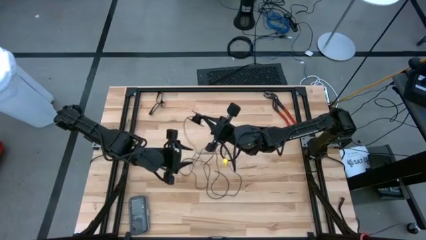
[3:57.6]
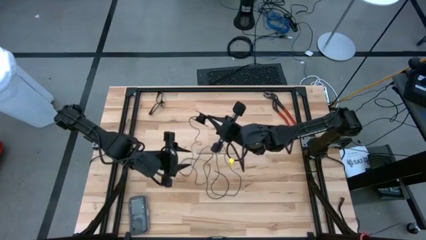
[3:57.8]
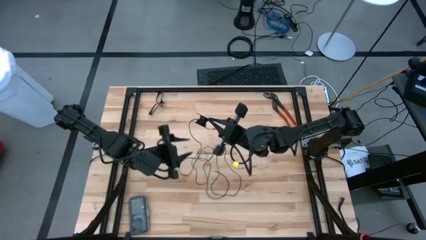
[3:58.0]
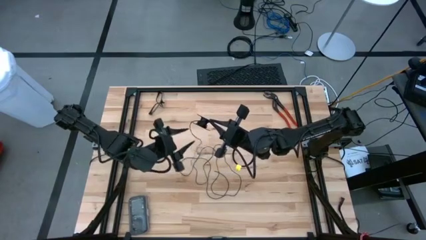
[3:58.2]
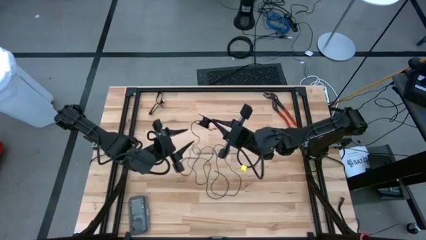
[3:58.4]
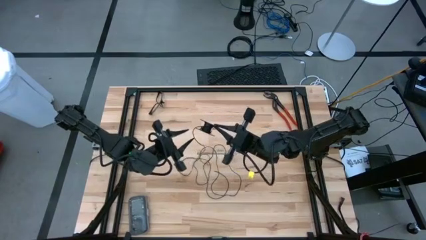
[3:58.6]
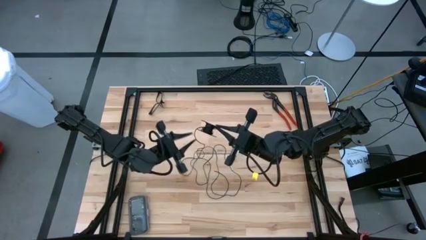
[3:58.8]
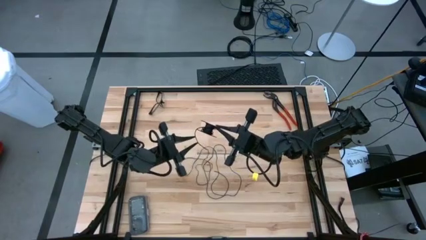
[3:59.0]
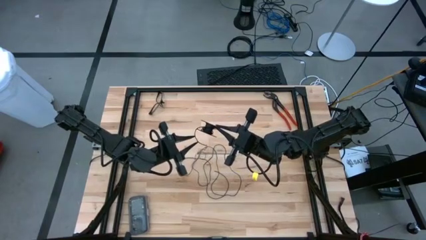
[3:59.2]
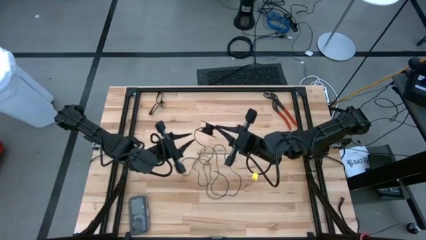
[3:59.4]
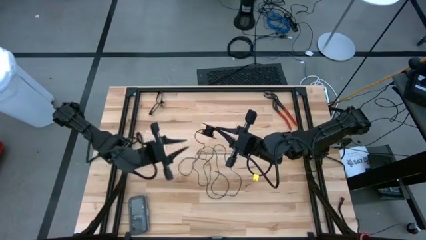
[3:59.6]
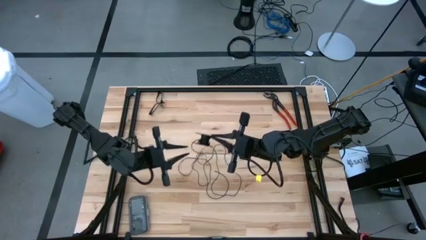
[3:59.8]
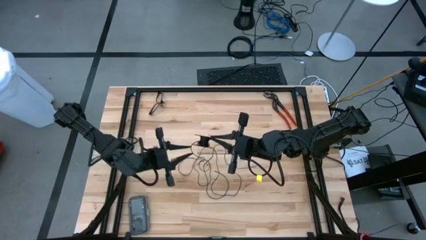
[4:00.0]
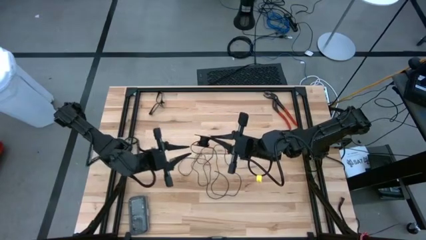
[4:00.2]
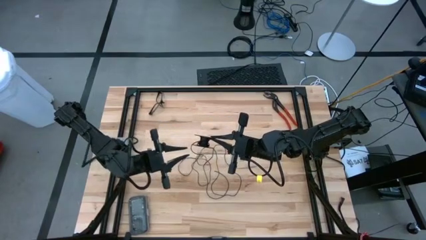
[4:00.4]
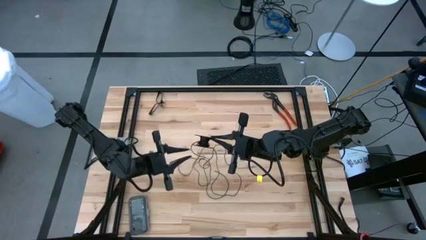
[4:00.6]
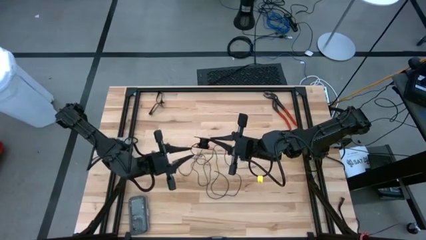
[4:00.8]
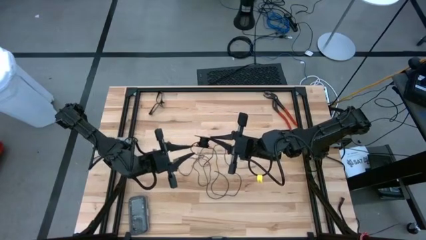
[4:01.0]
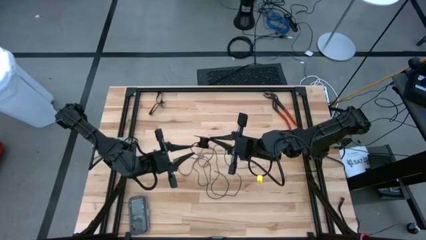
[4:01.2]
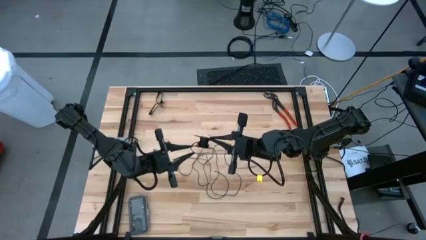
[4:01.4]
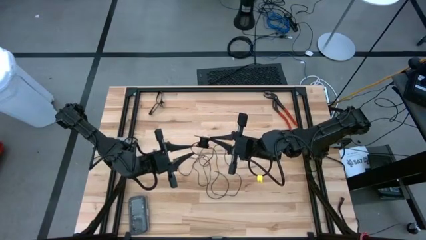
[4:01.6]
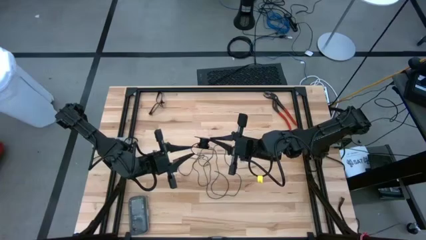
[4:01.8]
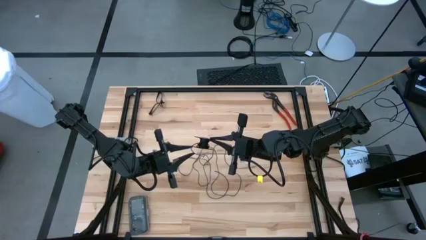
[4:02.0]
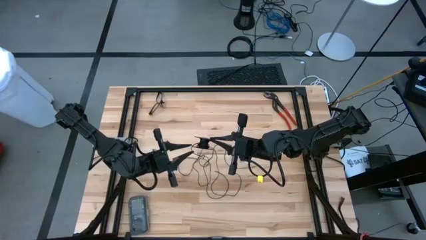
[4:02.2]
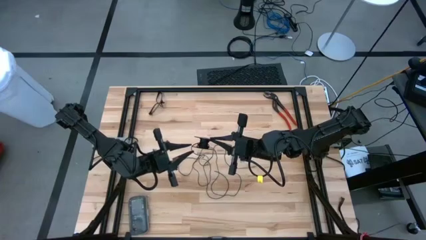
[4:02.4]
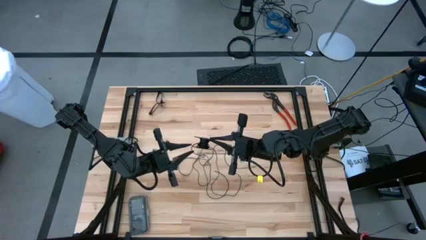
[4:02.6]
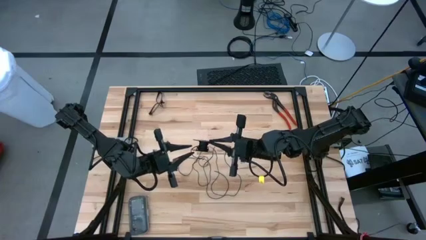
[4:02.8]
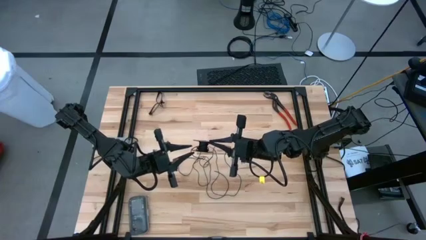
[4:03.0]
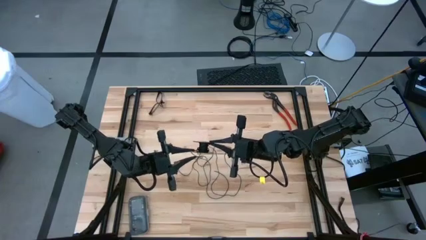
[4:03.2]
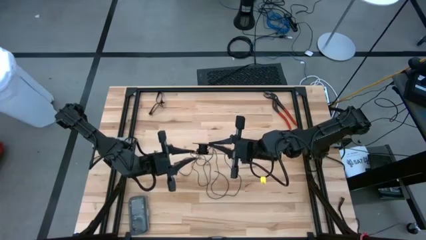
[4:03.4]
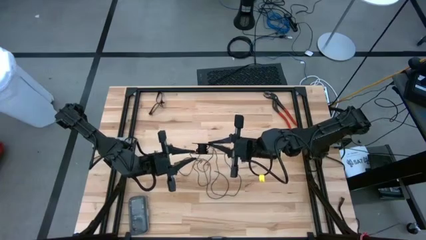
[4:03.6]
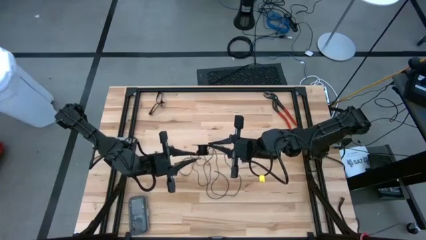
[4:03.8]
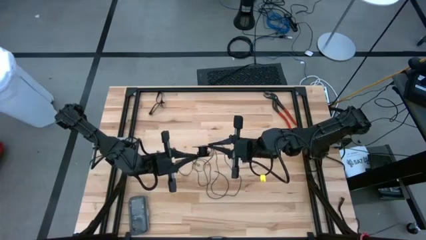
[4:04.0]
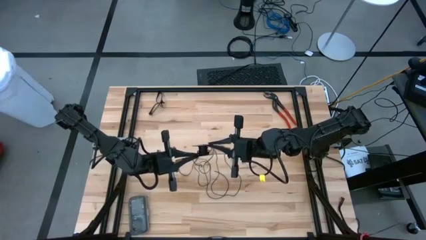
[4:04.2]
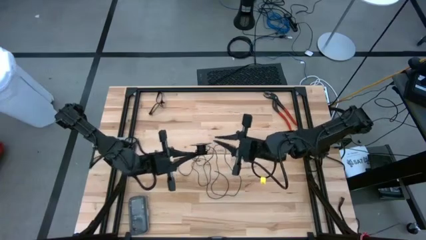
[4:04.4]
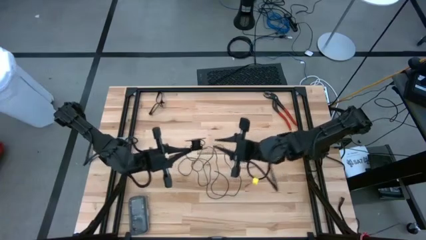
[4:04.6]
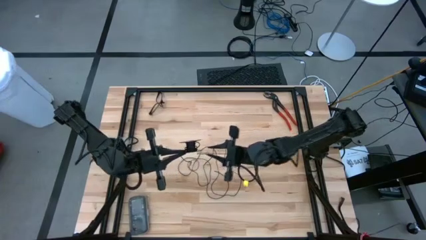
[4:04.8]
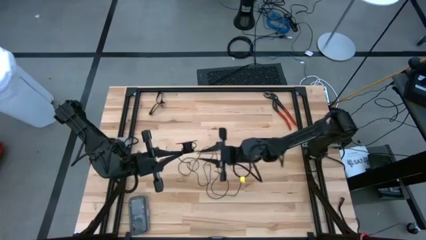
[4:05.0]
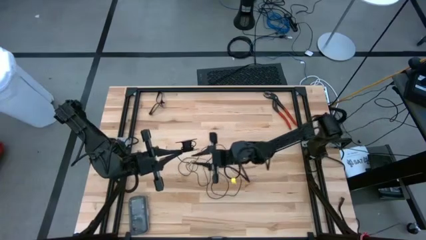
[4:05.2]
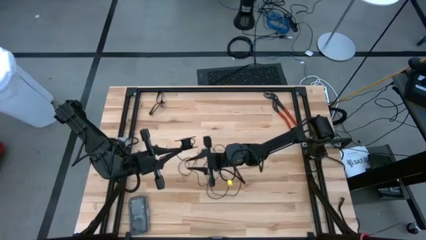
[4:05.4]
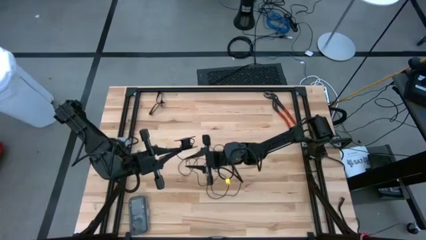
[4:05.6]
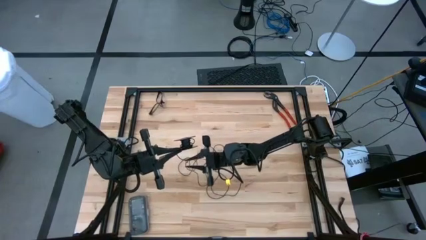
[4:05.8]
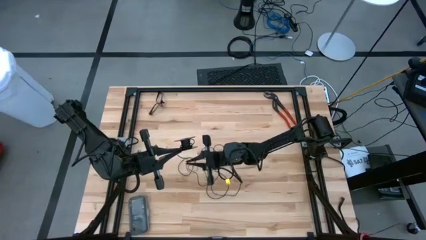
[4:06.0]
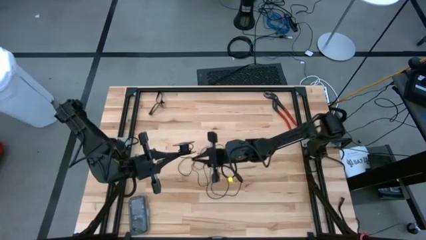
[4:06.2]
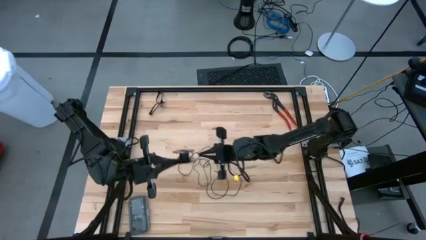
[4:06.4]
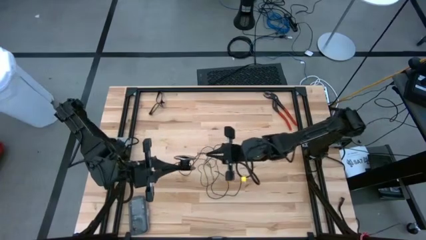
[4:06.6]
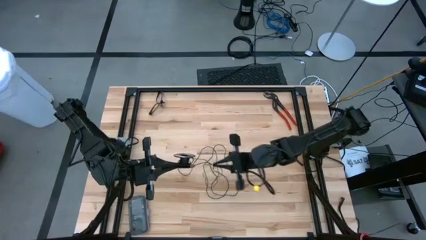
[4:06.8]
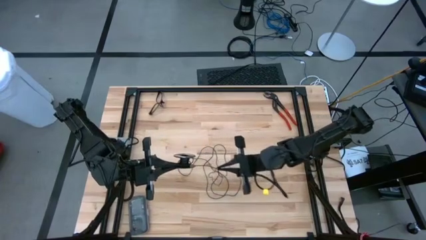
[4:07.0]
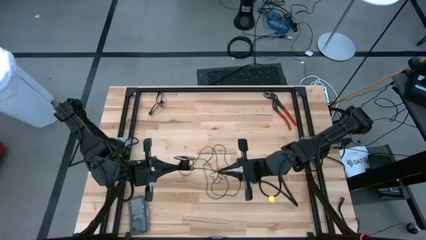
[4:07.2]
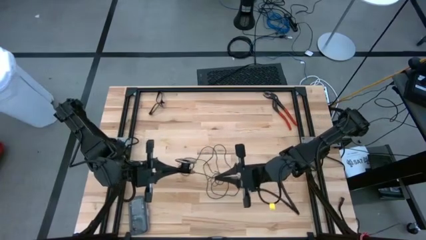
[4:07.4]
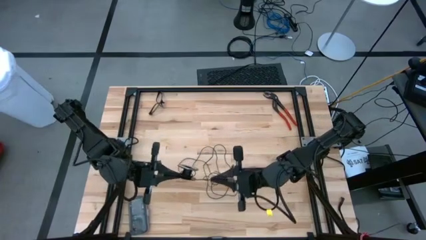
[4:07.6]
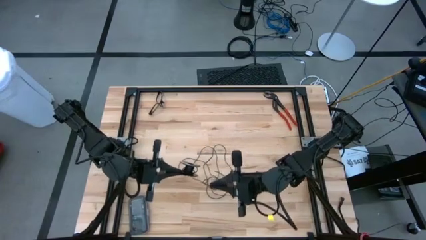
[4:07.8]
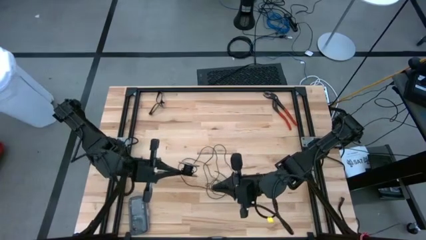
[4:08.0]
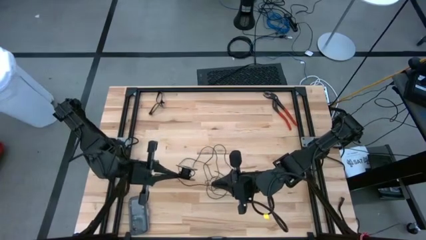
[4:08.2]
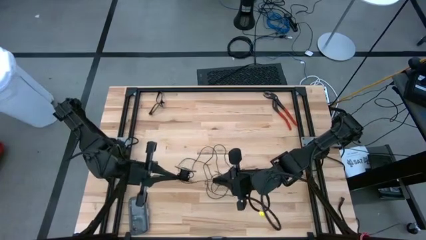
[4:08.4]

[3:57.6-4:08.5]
Task: Coil cords
Coil the black wire onto the spool

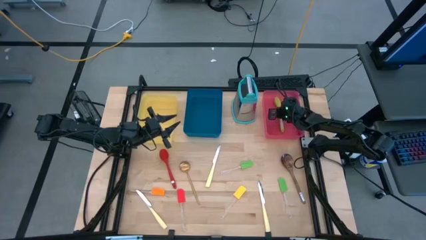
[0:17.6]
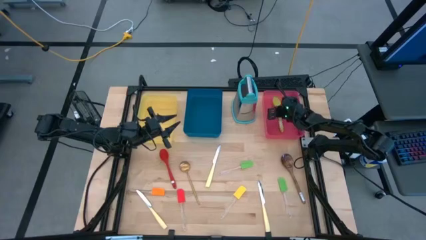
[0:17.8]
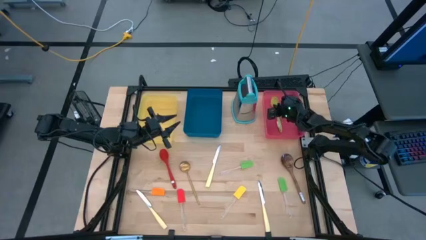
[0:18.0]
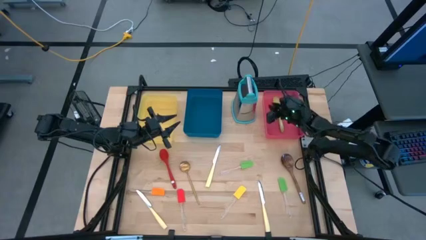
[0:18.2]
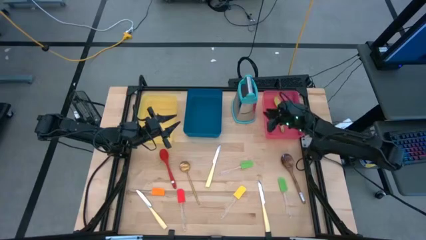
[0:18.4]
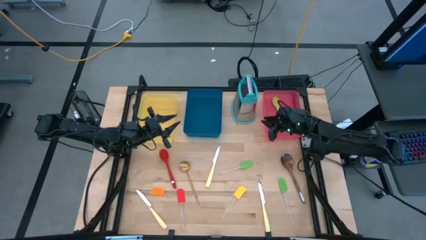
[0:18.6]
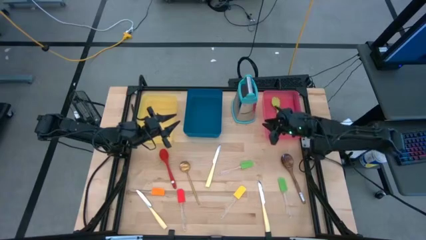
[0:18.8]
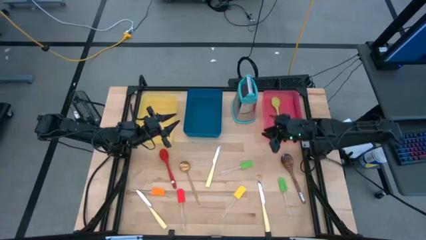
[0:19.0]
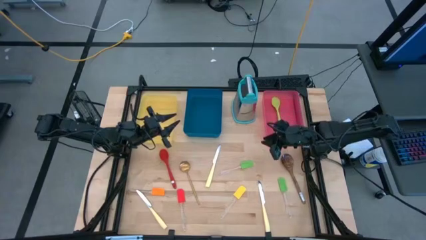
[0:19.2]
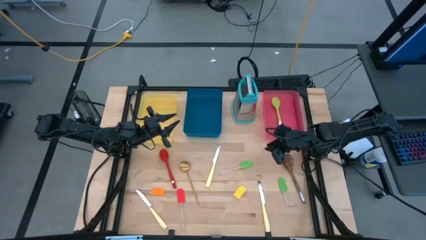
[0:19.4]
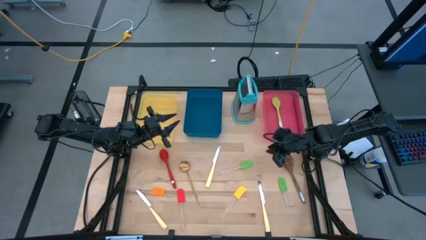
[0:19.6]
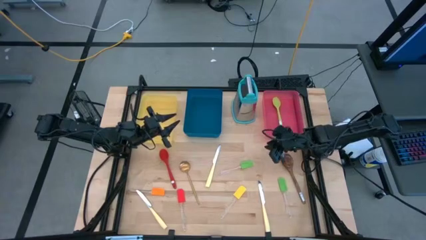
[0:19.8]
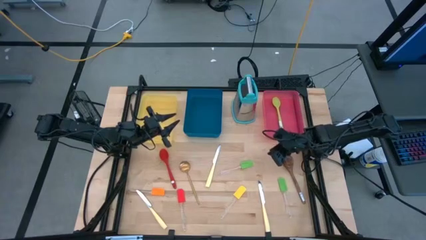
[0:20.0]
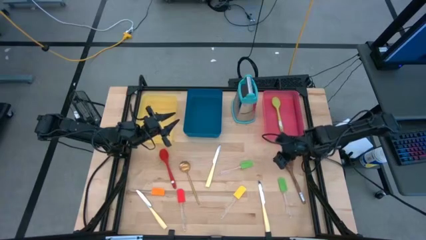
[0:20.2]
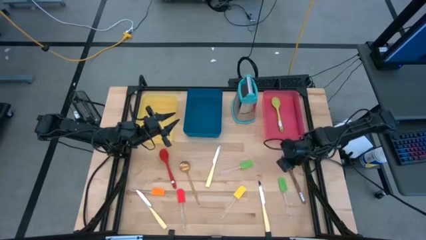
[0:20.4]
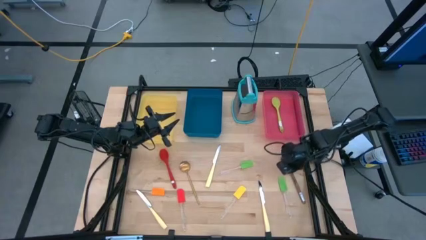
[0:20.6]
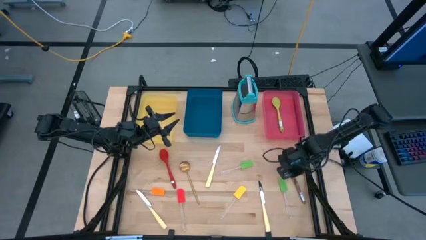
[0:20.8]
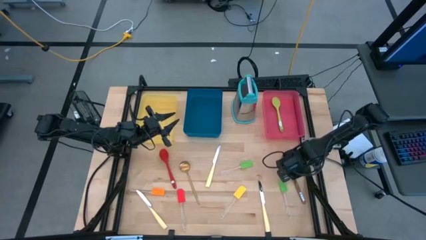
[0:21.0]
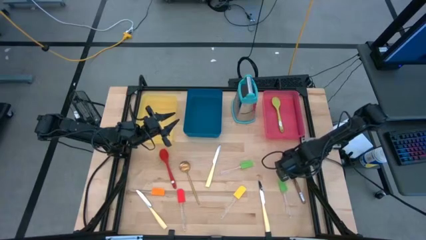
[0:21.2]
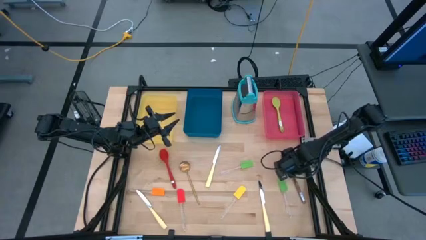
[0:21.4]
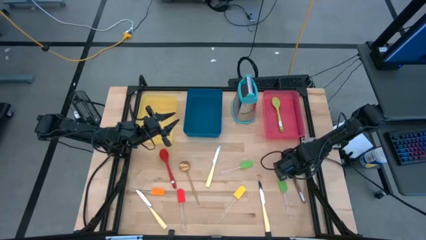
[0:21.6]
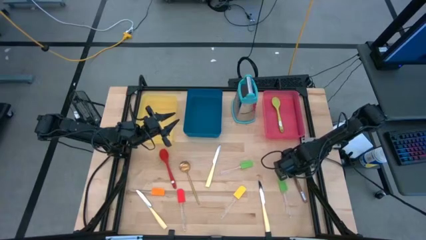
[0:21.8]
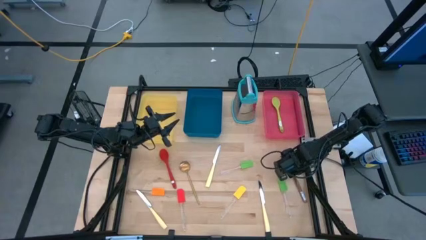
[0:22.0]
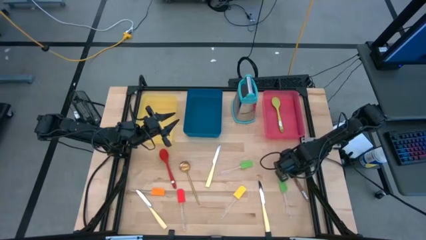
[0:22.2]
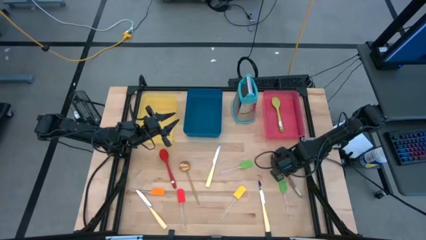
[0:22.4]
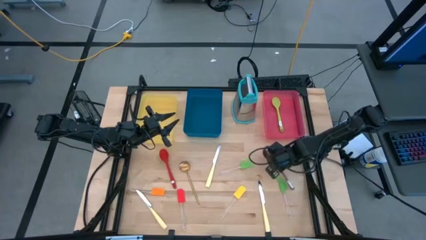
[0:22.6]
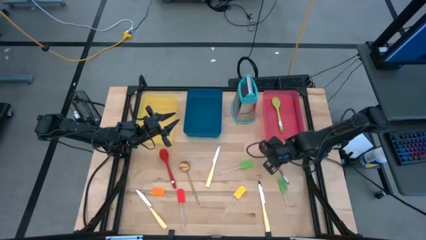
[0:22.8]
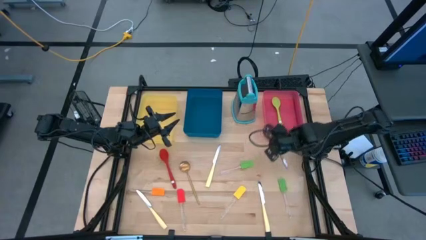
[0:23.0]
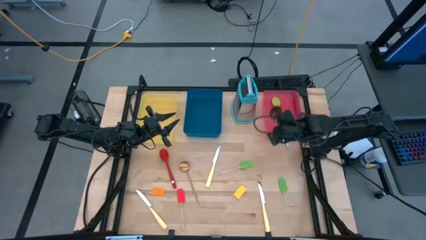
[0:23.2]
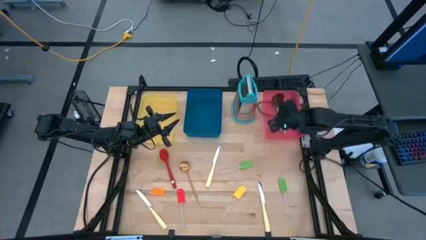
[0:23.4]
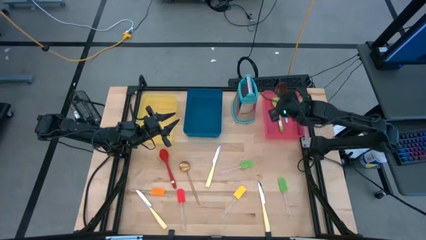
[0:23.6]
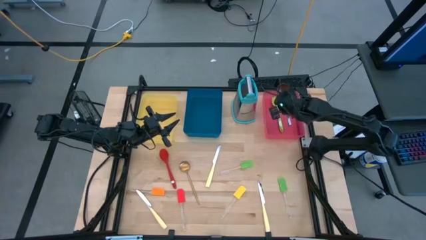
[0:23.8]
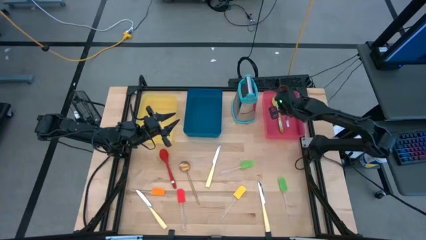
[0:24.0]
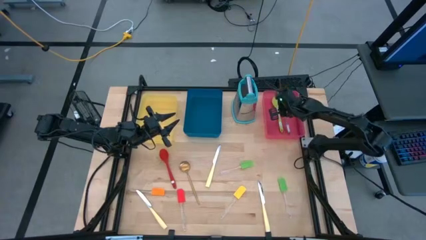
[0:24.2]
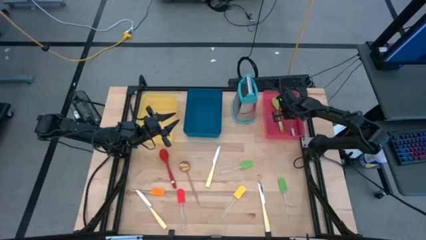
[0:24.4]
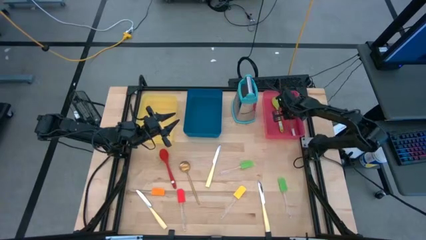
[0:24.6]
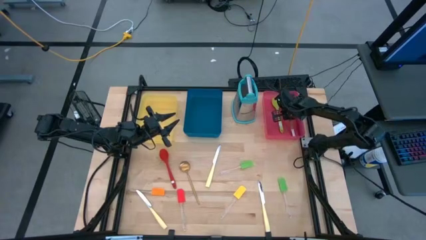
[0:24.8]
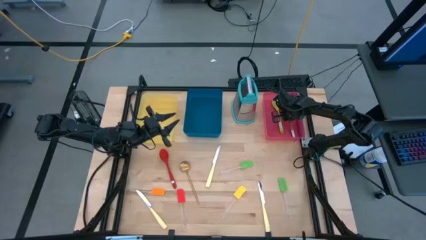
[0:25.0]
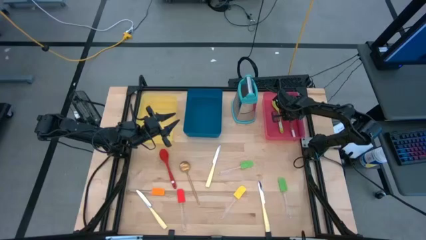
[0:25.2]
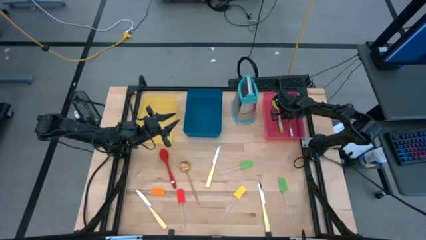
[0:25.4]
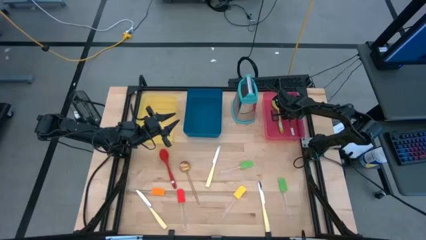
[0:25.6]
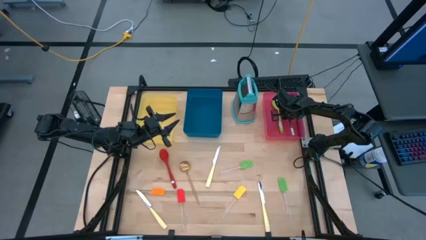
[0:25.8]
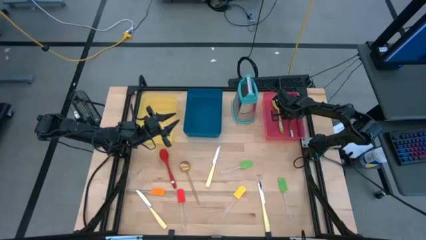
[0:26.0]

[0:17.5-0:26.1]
Task: Pick & Place Kitchen Items
Put the brown serving spoon into the pink bin
